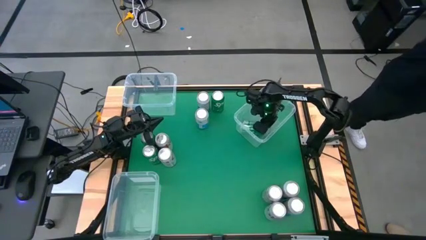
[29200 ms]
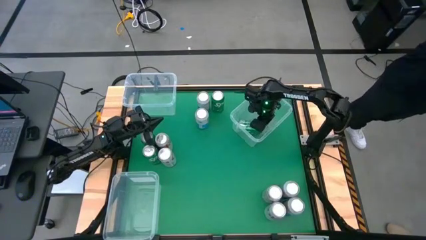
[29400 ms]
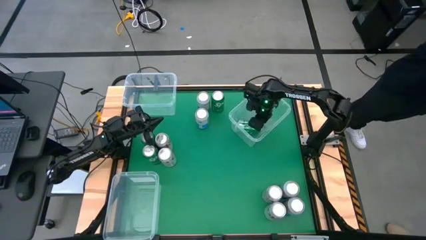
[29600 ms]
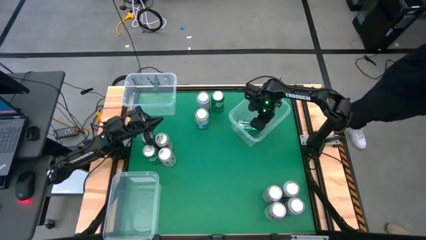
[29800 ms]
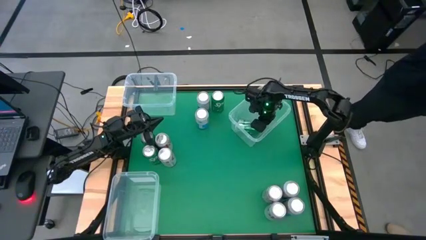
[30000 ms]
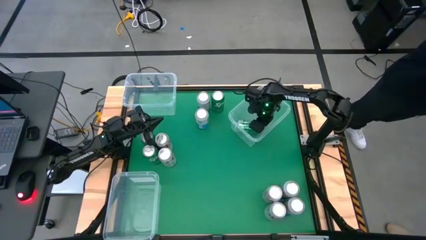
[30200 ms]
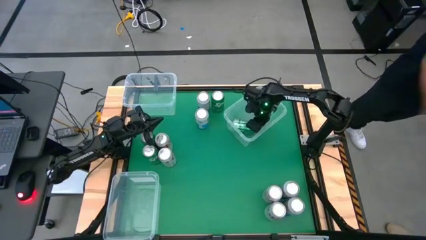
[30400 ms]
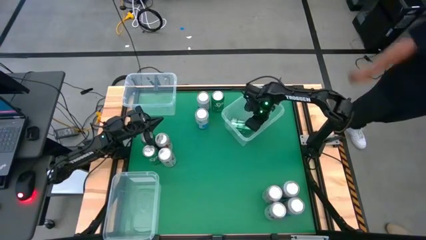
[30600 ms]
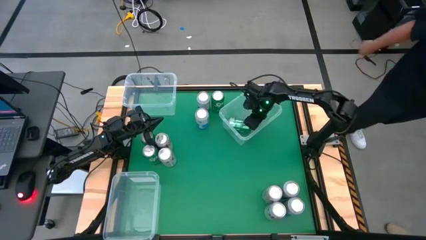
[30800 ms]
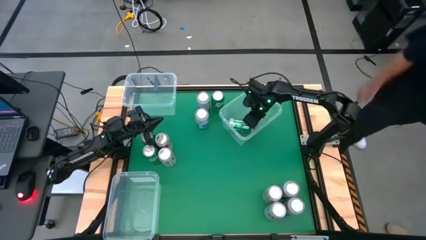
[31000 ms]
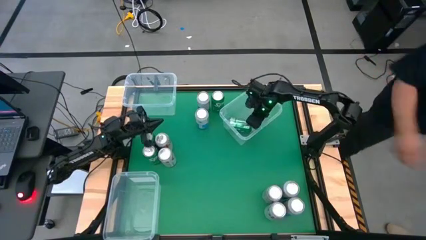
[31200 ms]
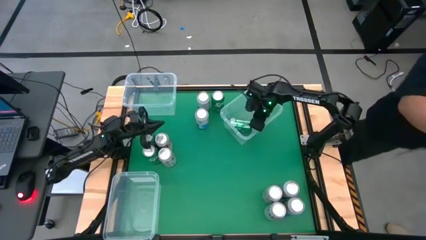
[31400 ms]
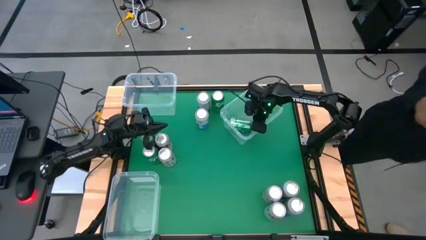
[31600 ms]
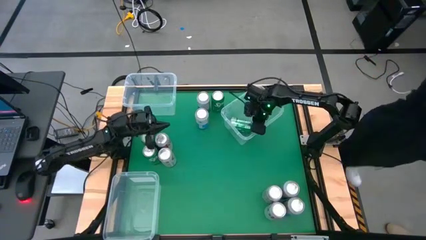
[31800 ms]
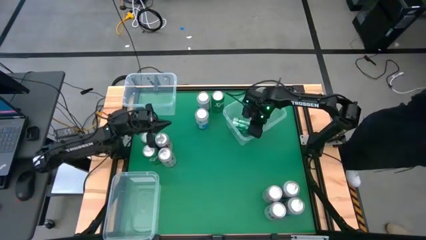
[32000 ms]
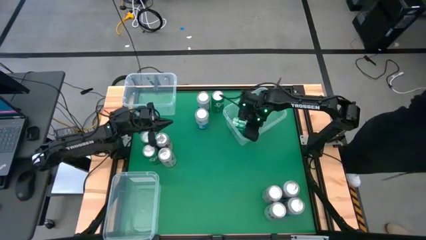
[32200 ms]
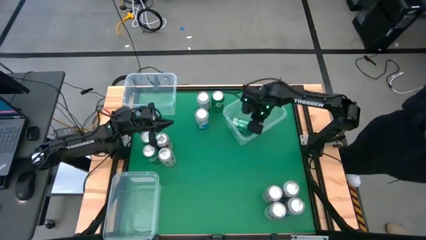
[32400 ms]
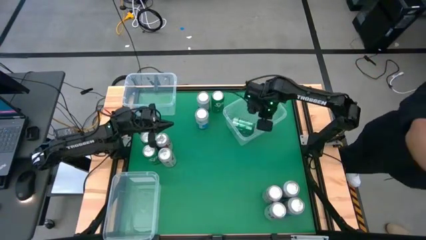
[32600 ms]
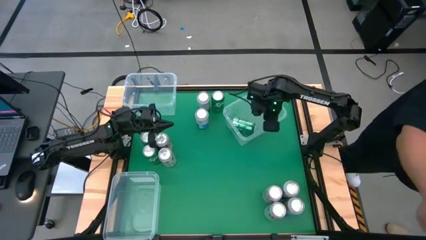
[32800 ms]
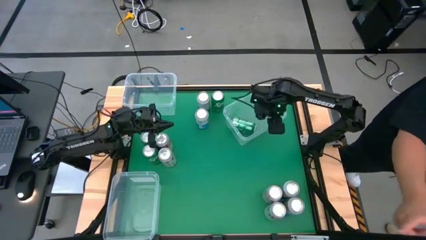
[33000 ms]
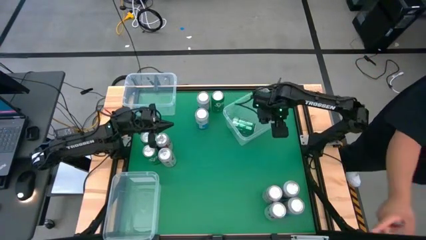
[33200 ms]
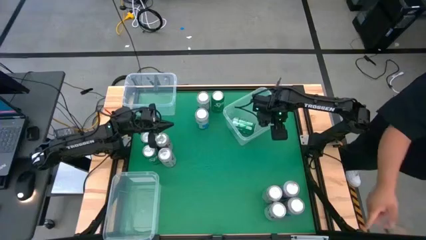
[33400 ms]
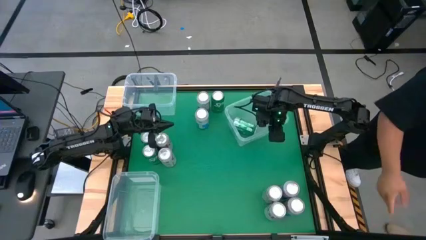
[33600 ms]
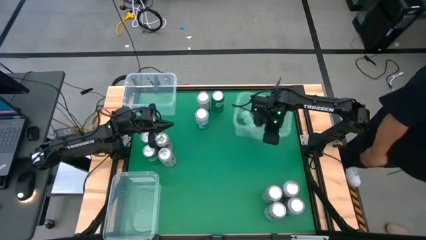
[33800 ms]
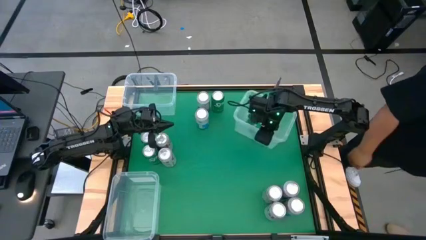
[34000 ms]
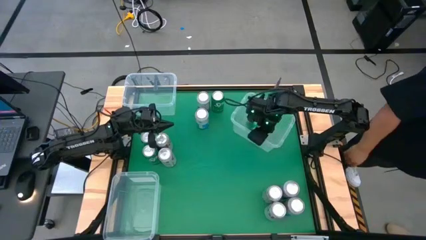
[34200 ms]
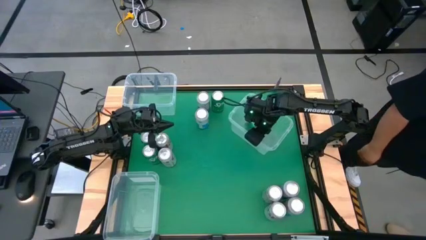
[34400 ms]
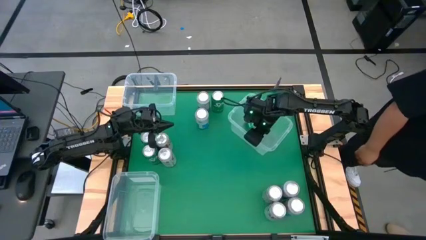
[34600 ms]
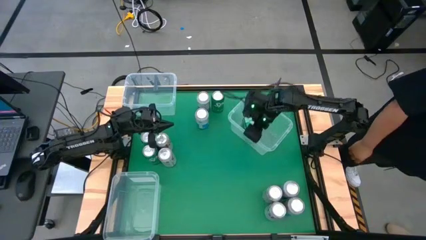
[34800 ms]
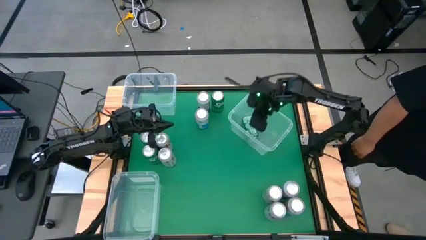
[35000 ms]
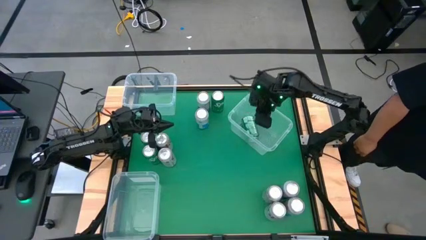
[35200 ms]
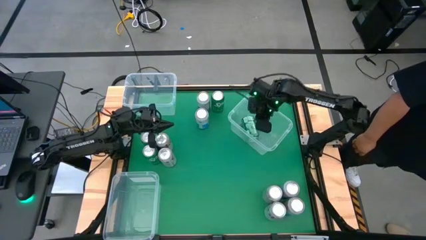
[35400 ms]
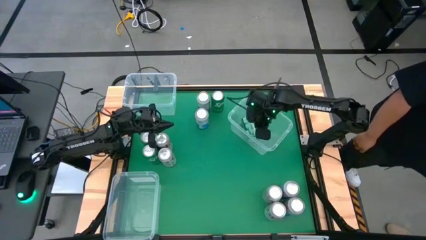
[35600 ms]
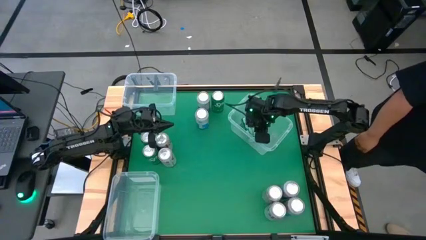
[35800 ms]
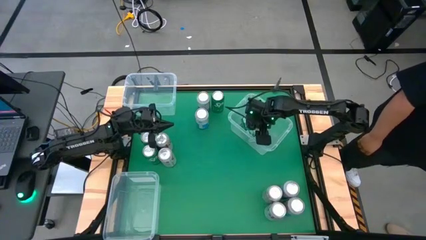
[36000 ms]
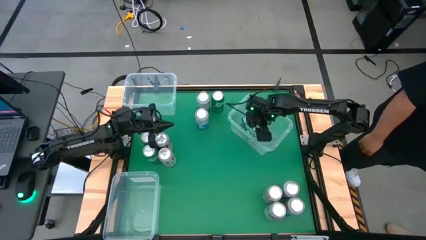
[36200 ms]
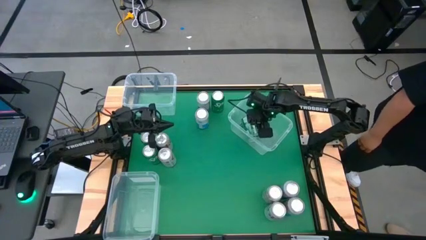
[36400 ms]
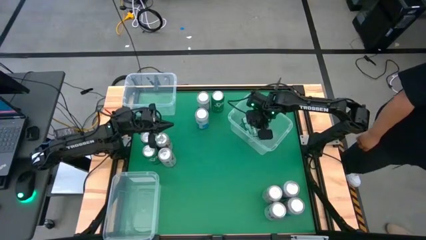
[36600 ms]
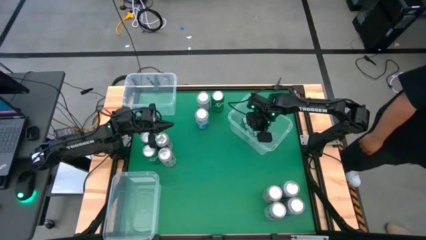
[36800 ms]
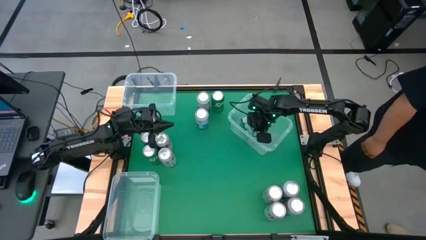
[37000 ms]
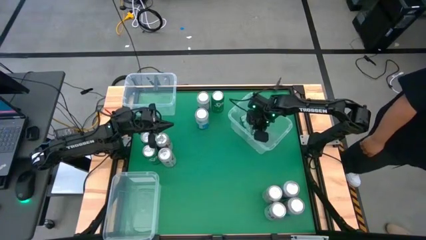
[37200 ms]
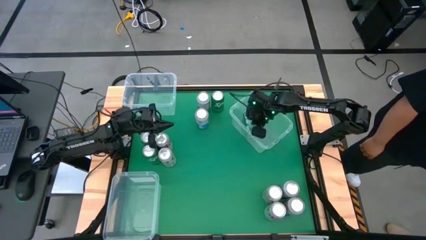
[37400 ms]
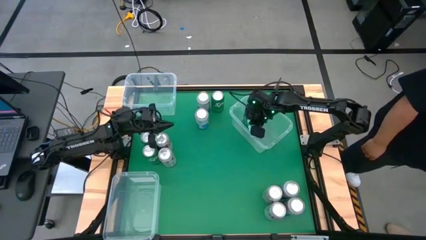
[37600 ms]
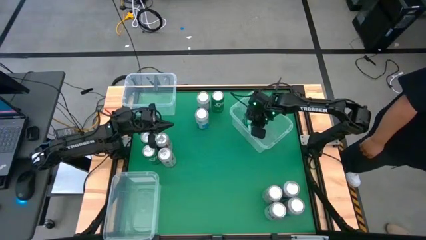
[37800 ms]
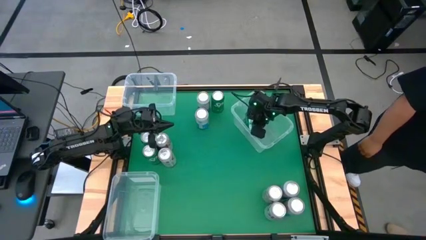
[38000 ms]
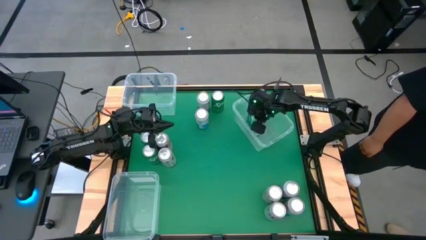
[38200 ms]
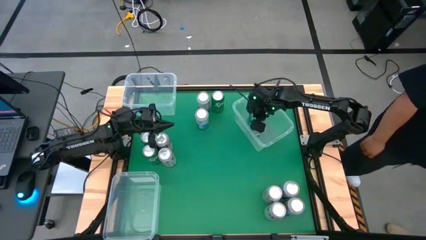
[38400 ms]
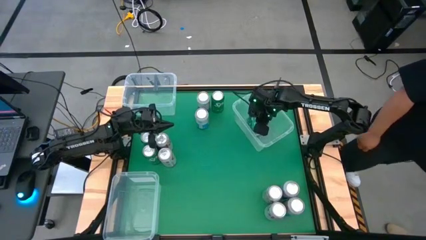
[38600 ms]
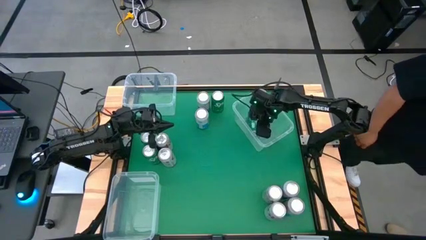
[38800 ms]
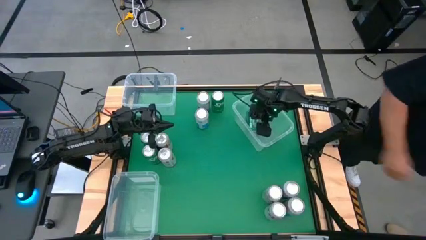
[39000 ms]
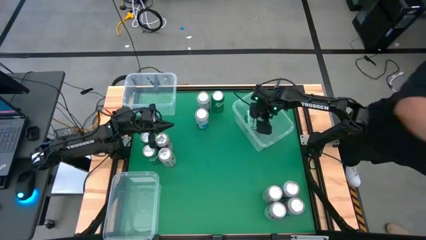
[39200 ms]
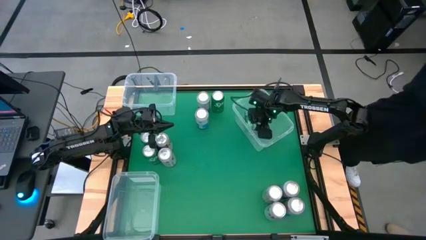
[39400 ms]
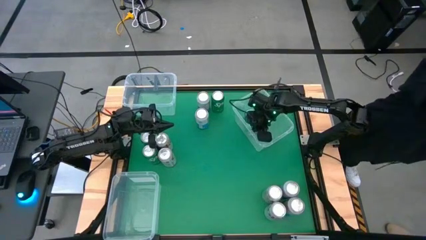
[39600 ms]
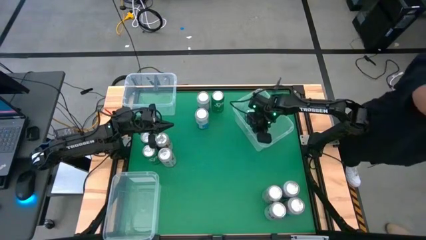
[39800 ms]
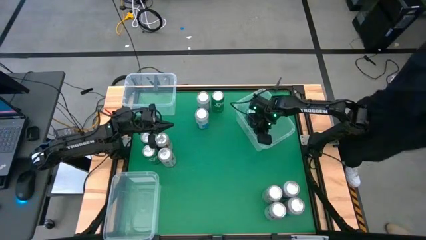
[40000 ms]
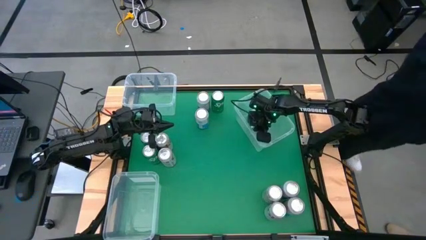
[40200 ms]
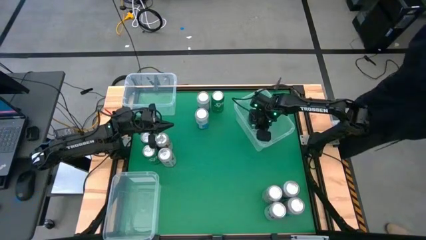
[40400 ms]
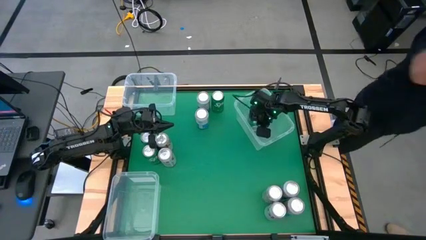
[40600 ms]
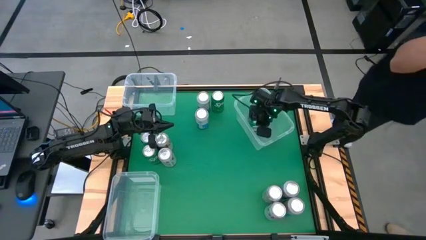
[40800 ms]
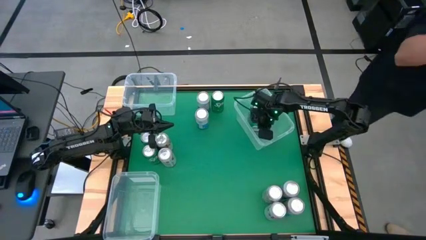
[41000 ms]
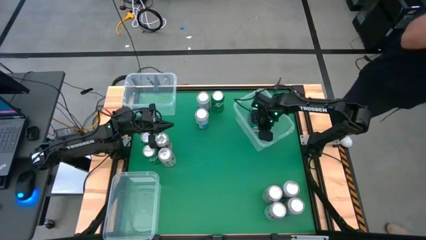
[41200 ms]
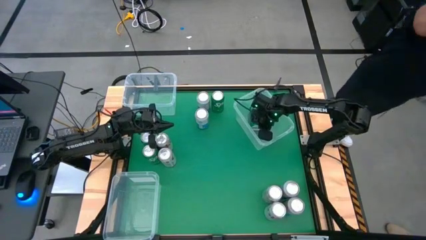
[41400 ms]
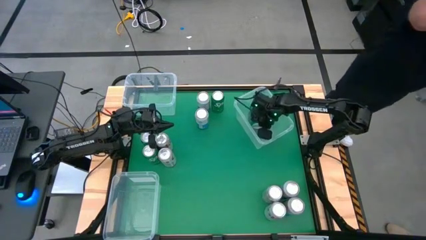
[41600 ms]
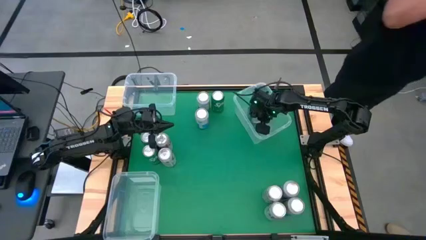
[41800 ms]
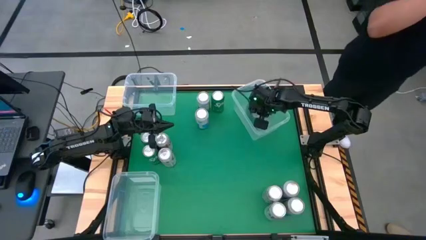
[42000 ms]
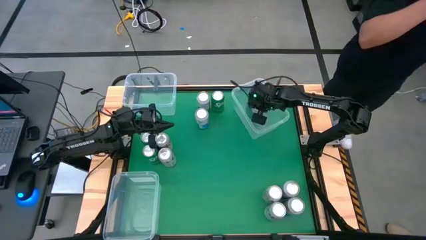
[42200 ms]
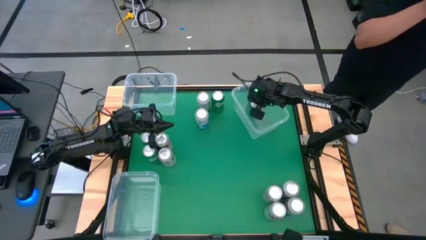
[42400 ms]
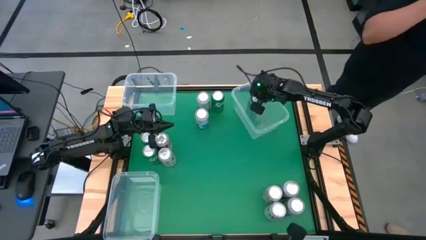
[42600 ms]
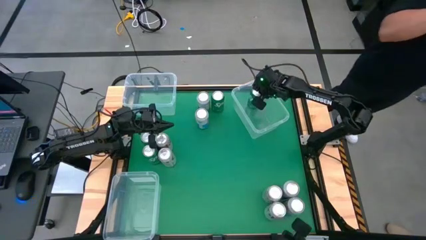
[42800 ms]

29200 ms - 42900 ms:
Task: Sort soda cans
Put the green soda can into the top right transparent bin

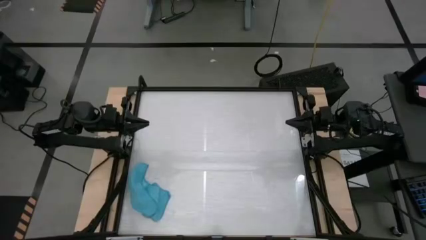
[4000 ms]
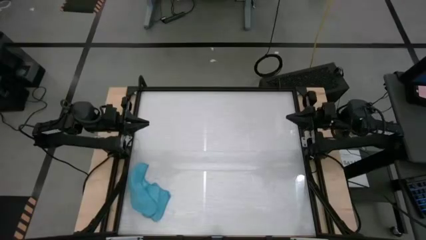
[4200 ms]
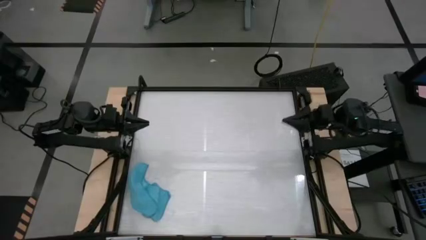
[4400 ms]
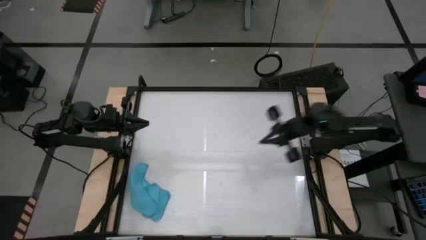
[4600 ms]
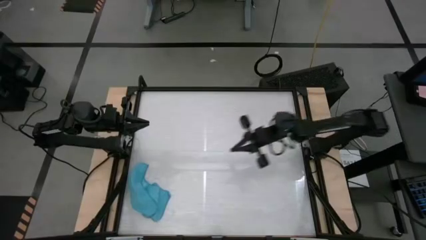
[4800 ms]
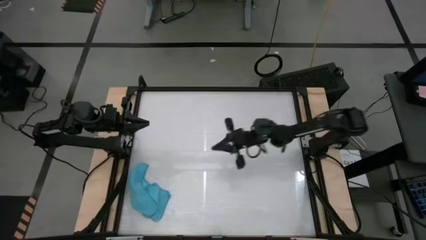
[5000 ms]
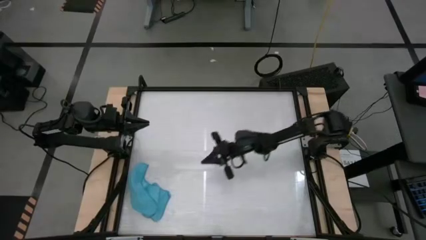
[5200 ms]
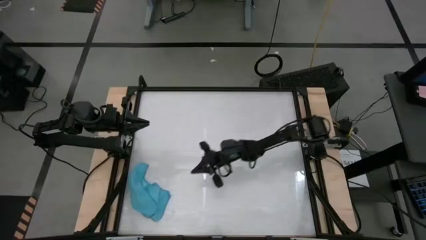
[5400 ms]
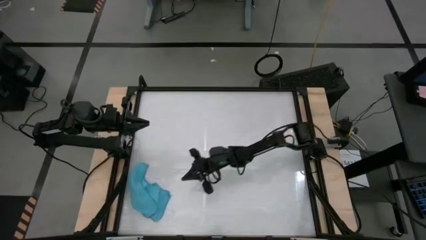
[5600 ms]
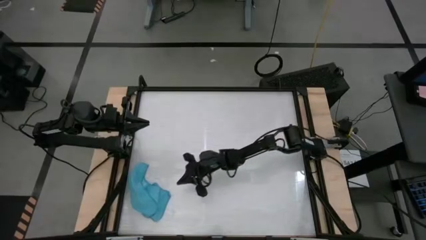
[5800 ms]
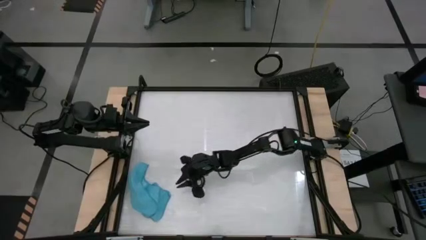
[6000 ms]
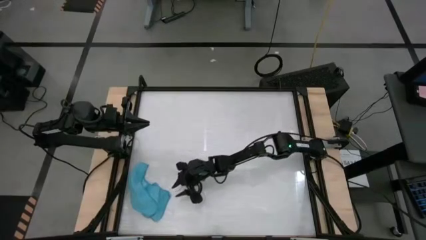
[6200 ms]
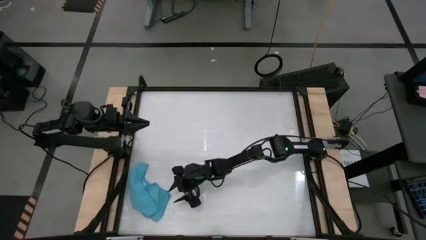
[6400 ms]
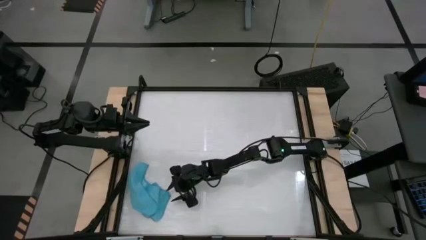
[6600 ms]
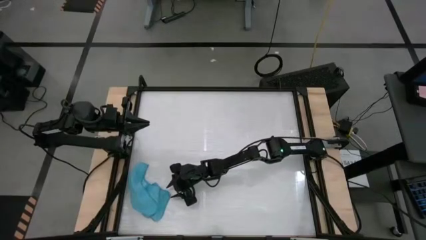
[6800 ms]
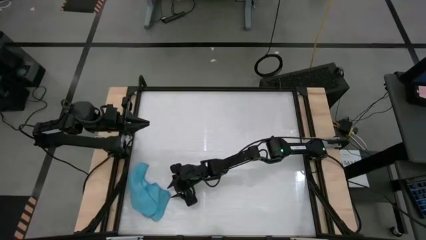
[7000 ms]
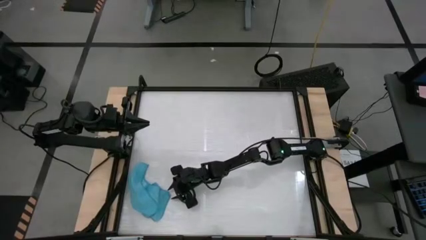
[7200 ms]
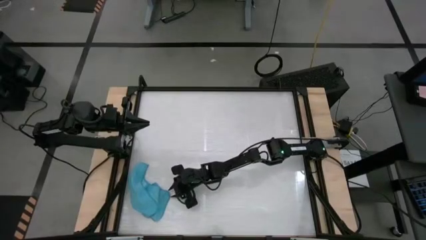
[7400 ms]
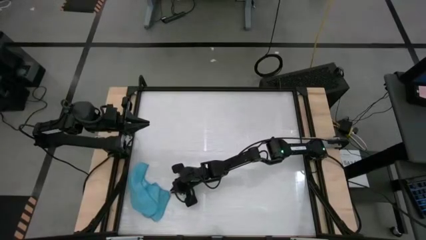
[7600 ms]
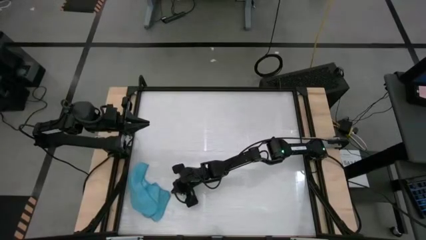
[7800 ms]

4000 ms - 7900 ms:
Task: Roll towel
Roll the blue towel
